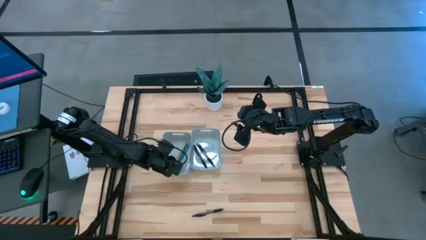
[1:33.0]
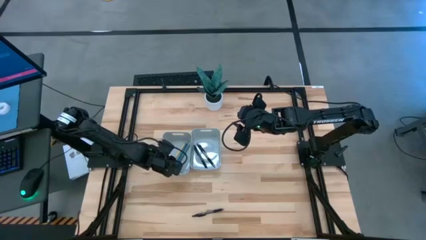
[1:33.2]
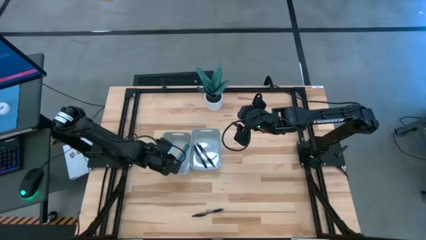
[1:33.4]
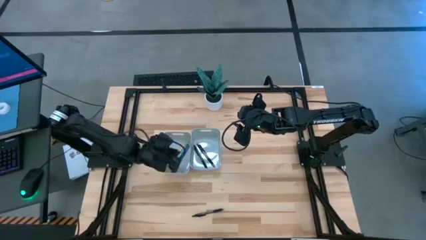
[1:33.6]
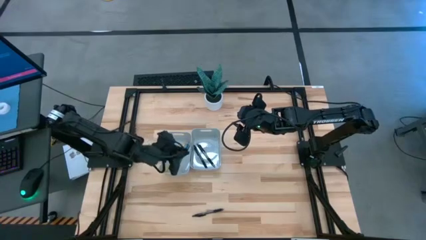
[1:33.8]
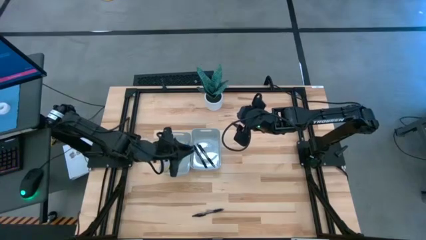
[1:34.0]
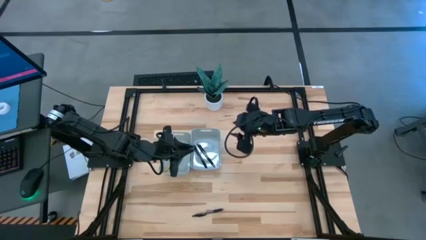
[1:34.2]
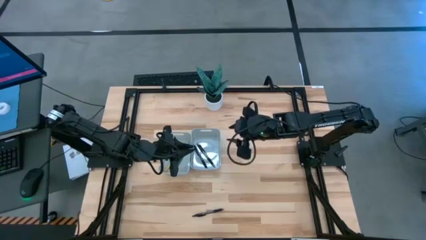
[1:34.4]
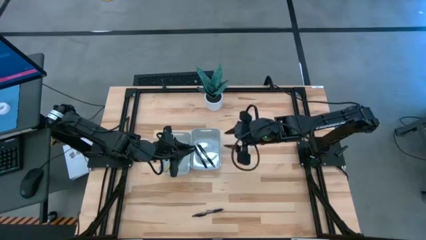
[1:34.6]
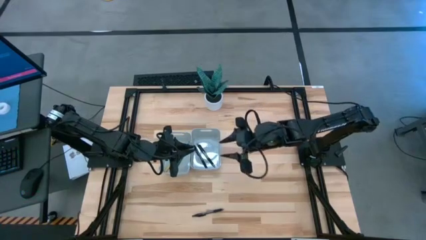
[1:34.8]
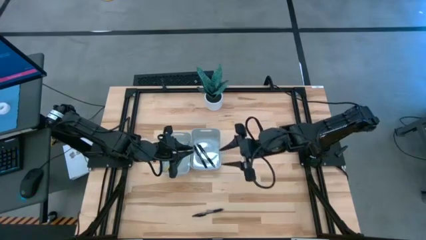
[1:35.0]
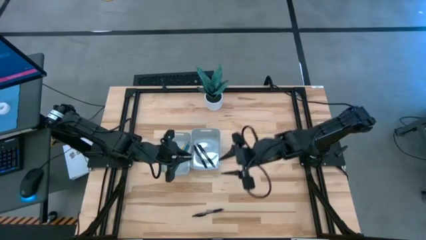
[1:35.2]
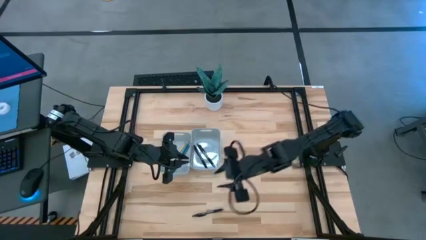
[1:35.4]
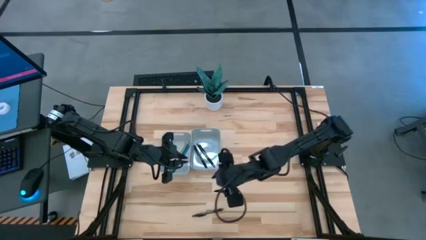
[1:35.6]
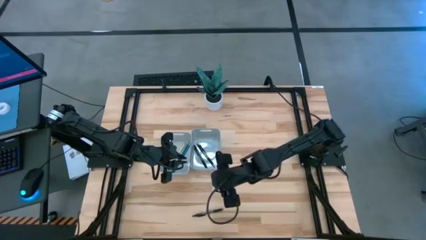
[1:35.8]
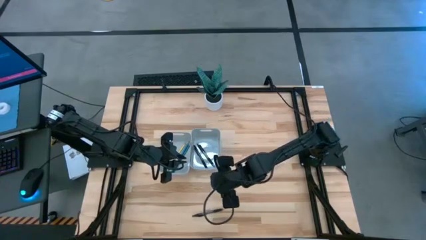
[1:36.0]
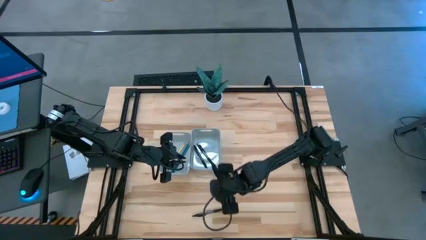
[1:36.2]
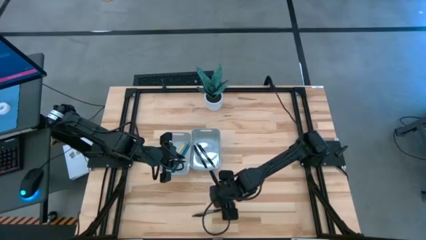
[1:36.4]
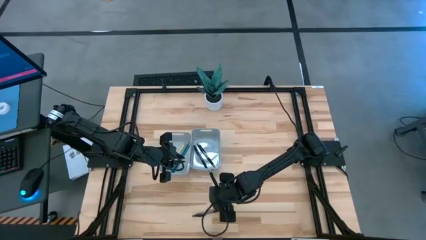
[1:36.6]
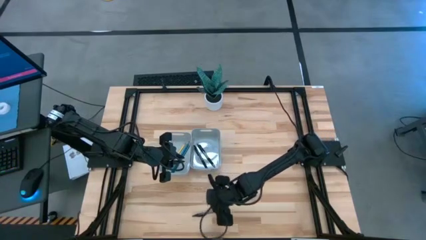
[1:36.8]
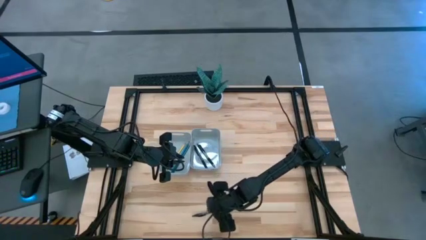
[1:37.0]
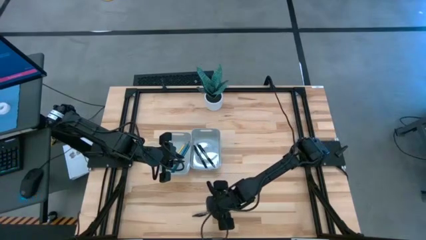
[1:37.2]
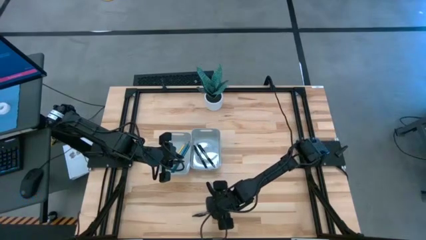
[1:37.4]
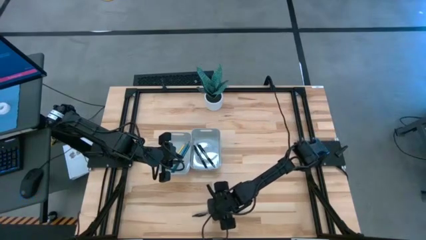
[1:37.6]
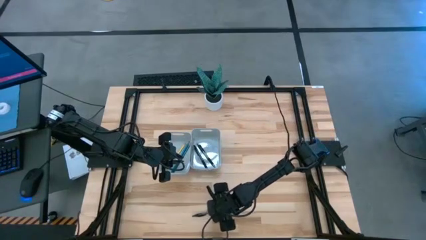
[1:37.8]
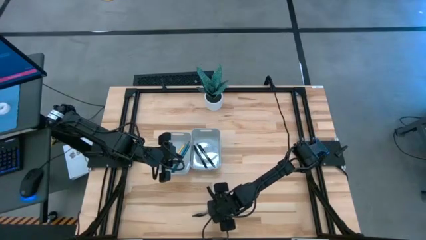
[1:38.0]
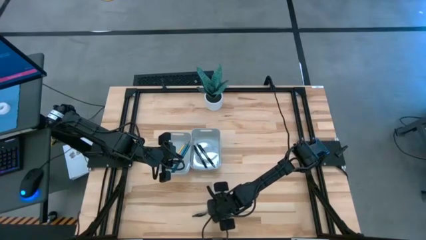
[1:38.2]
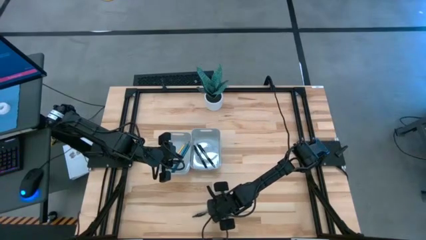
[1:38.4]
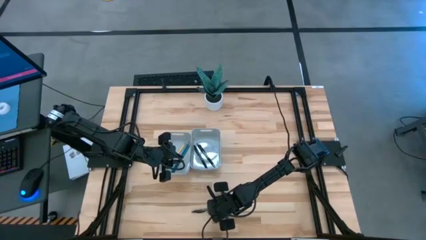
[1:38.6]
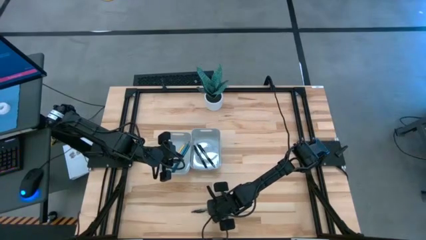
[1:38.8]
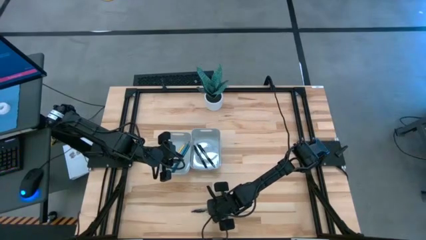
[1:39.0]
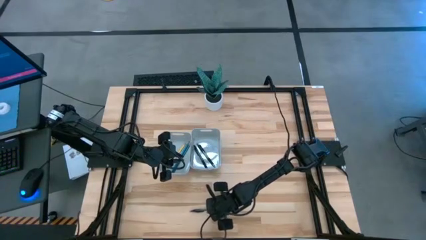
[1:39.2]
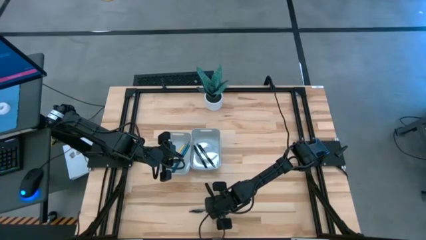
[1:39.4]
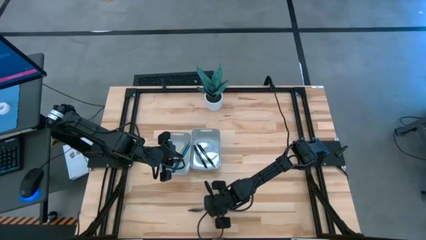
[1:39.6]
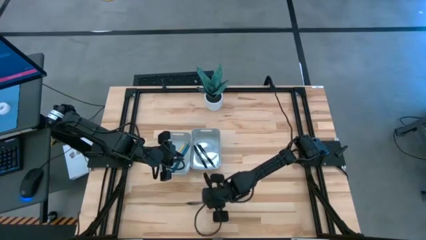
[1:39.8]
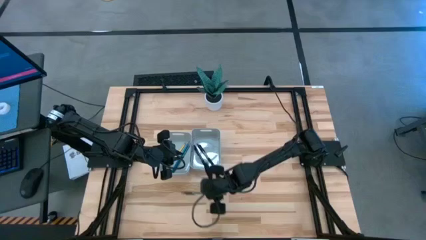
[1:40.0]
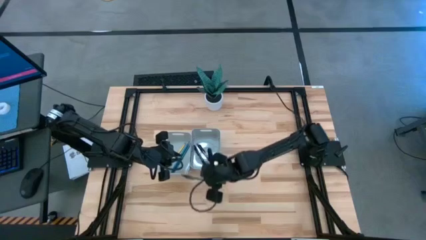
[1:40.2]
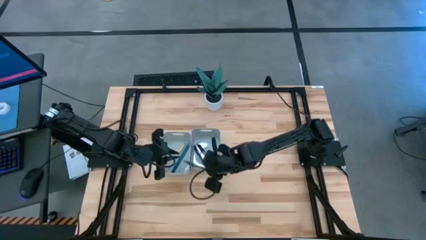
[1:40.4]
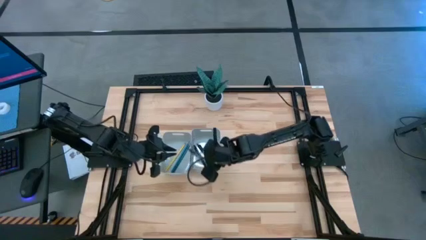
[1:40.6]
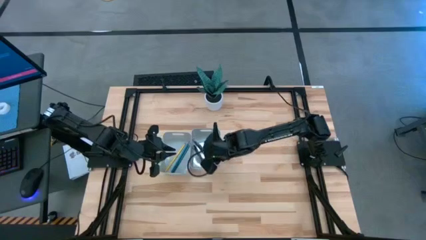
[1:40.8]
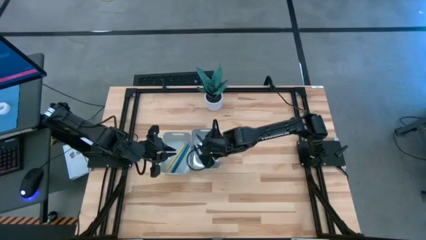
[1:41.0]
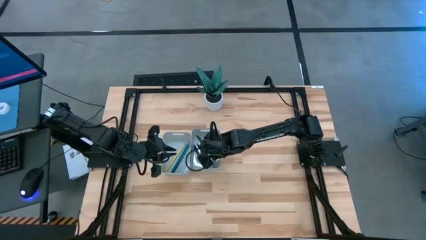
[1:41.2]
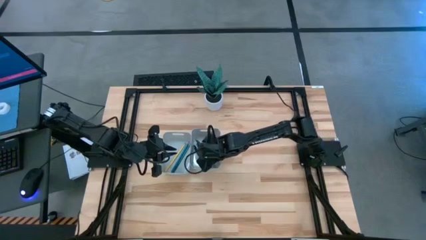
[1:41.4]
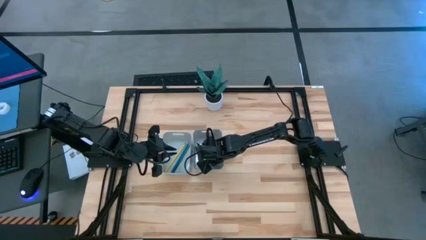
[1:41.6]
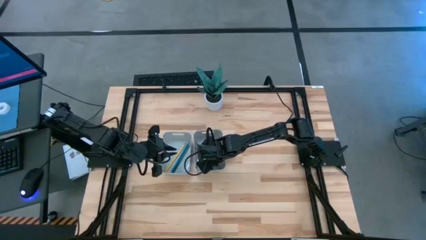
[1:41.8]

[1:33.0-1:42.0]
Task: Sort pens & pencils
Put the black pen into the right gray bin

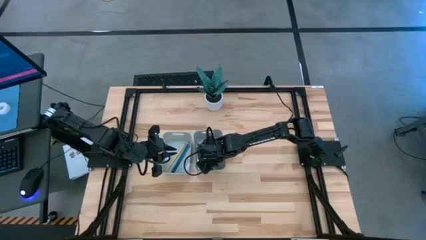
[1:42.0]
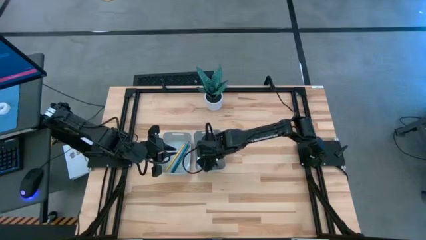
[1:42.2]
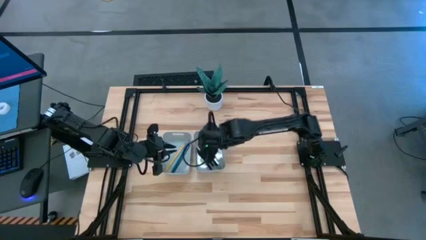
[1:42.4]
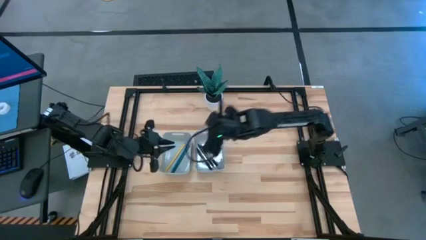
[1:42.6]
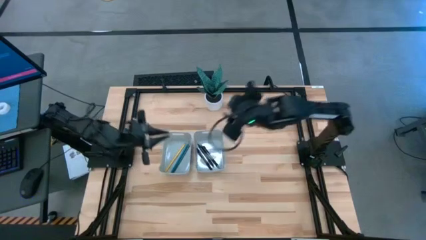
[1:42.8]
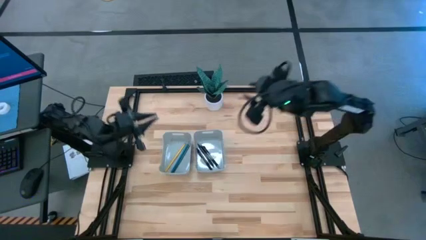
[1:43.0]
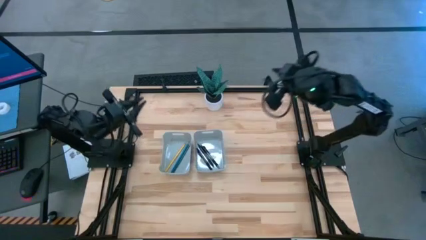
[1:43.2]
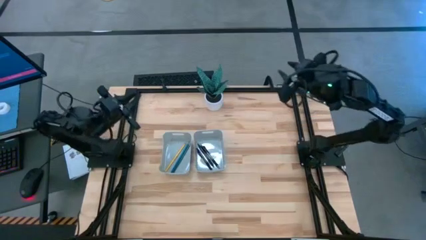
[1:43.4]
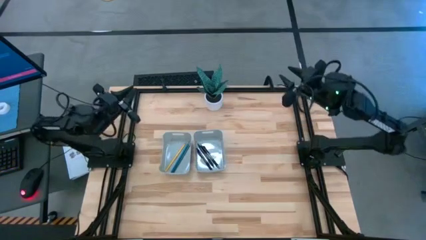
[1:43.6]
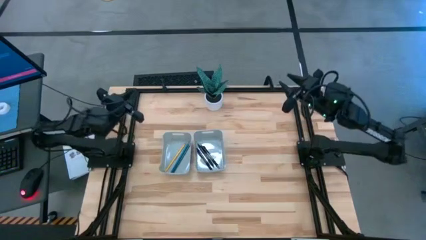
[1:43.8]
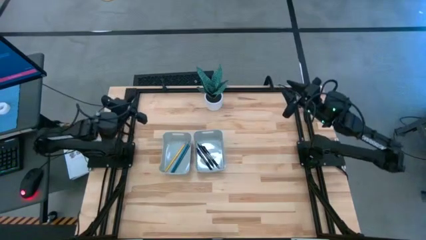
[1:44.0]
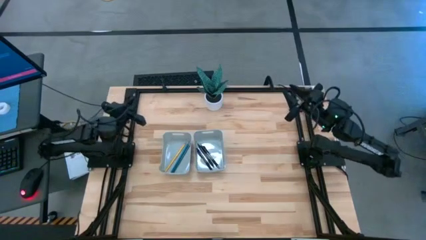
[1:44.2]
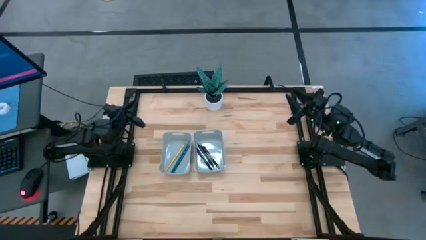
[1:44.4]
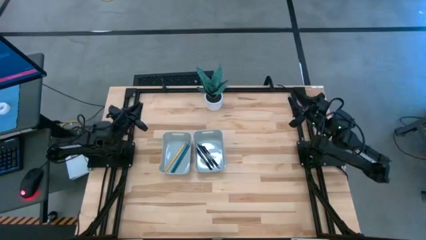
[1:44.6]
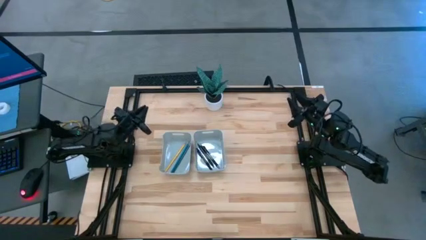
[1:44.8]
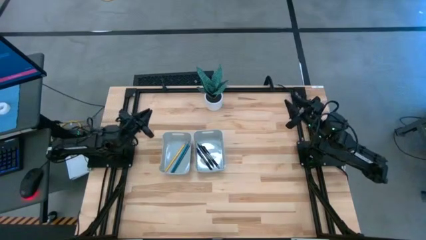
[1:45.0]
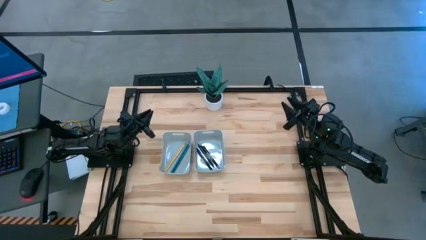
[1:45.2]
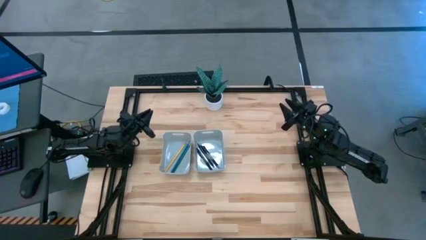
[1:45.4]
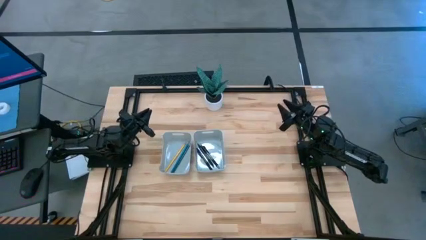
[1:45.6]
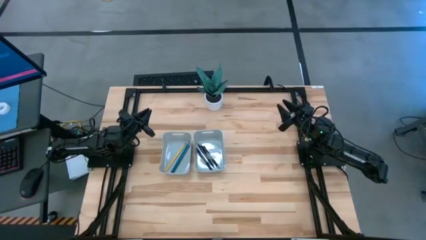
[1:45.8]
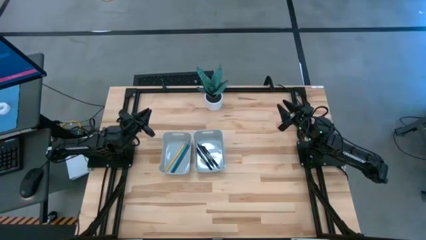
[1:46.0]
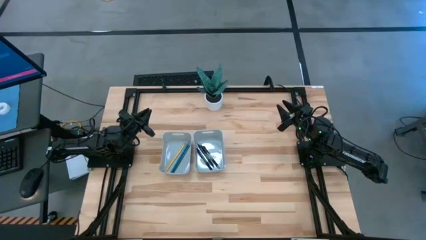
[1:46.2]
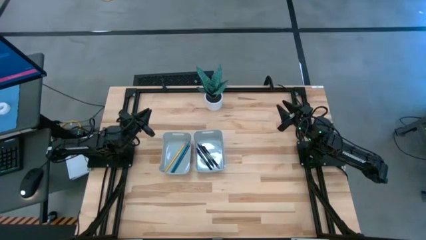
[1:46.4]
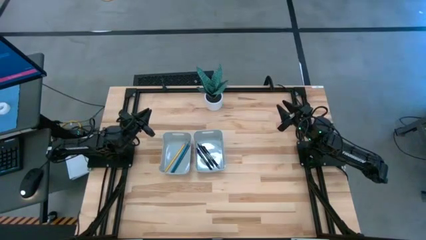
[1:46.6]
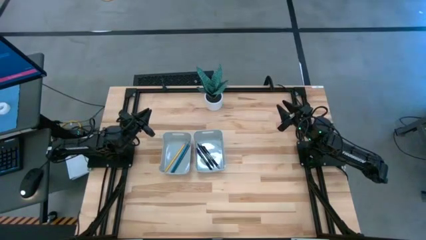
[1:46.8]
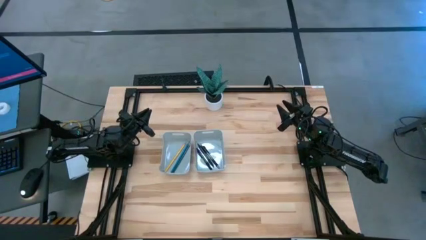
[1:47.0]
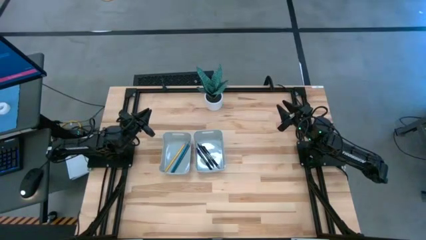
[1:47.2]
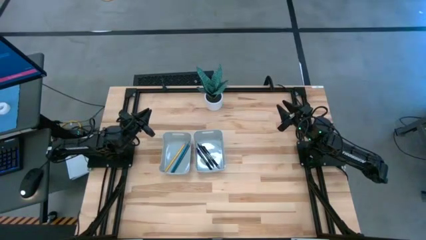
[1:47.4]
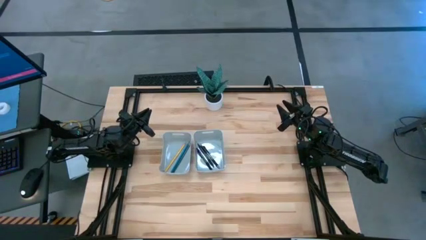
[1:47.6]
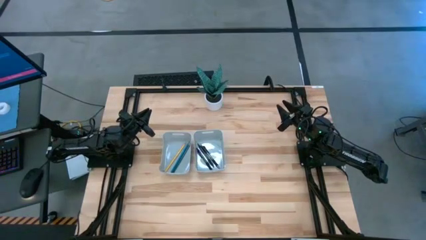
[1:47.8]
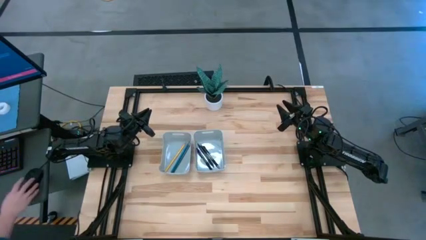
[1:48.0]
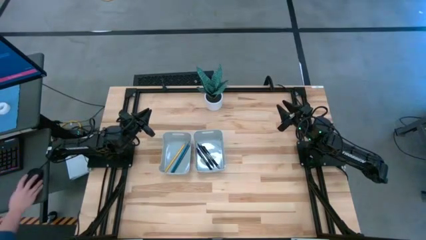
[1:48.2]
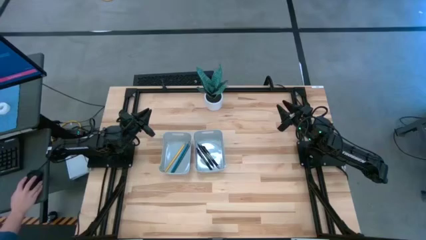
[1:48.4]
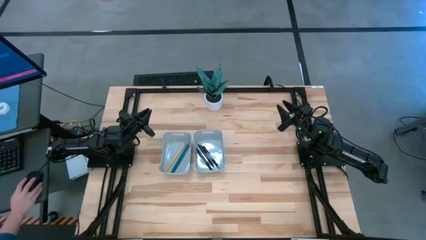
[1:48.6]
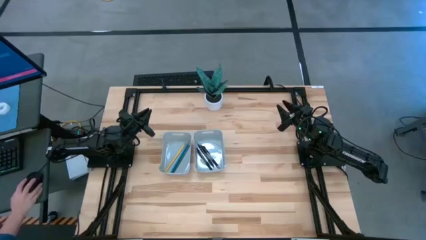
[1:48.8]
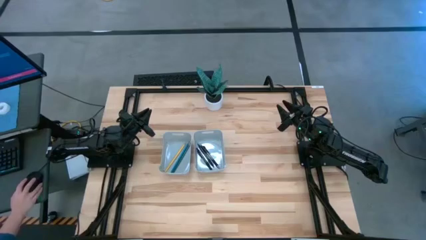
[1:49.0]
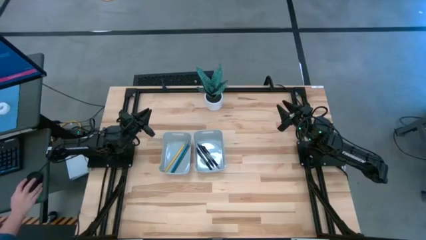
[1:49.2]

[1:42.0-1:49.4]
Return to Home Position

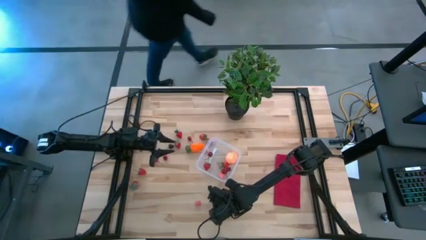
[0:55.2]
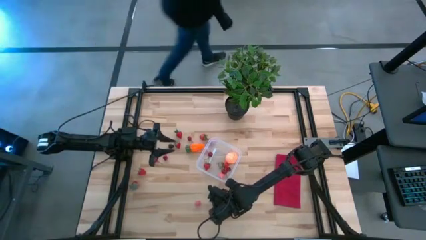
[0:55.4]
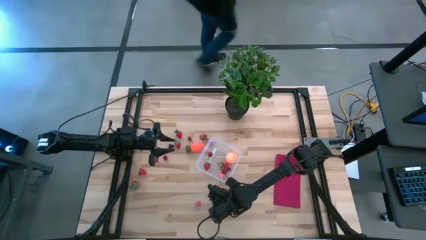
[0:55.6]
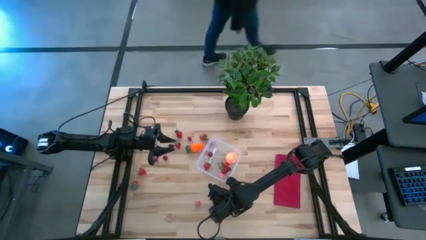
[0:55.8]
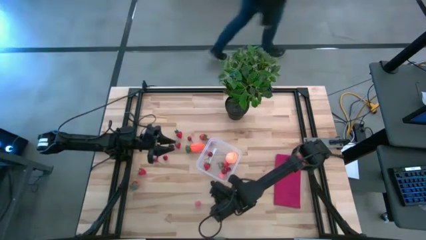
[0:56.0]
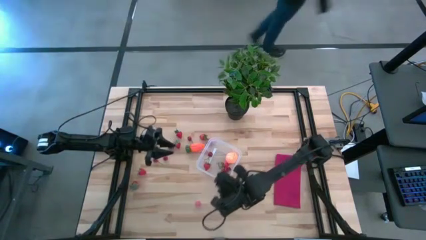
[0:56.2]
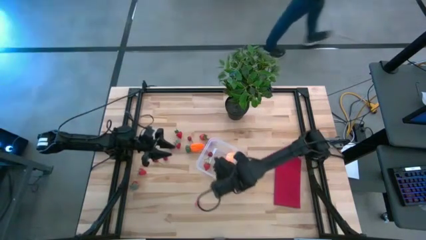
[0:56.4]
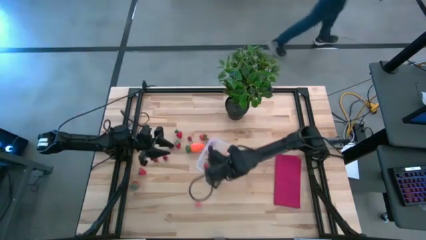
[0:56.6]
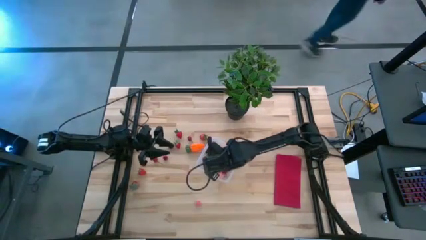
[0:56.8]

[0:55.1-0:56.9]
Task: Pick and placing Produce into tupperware
Put the red cherry into the transparent bin
